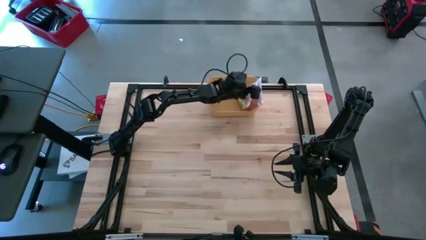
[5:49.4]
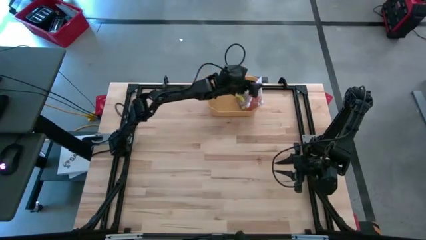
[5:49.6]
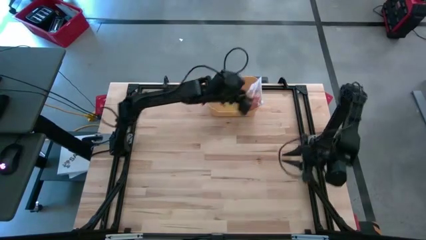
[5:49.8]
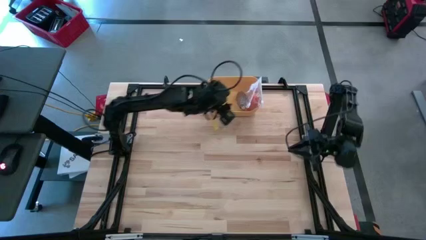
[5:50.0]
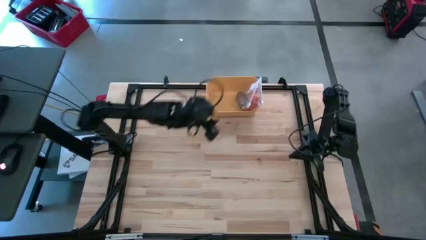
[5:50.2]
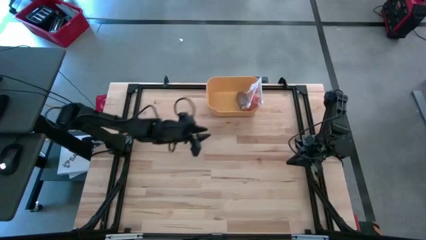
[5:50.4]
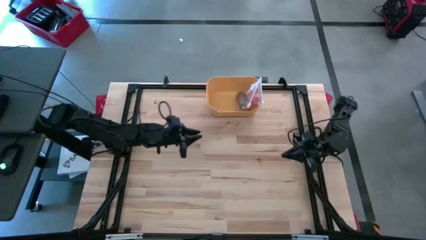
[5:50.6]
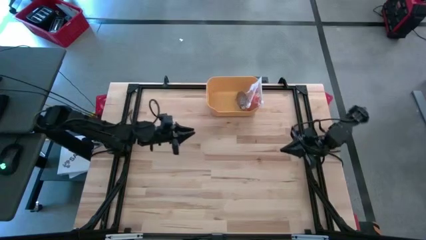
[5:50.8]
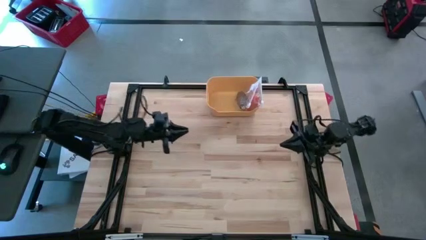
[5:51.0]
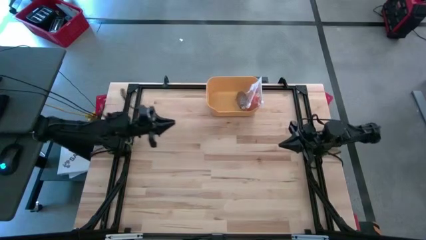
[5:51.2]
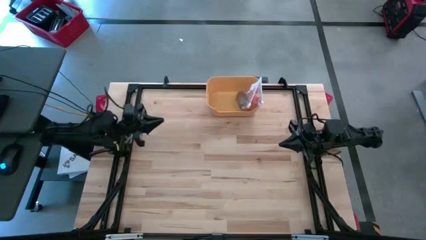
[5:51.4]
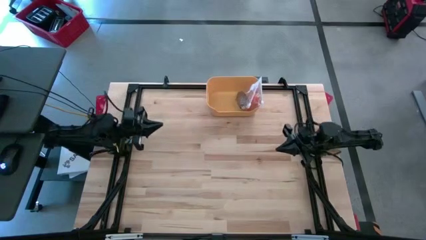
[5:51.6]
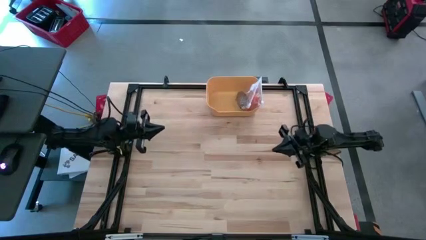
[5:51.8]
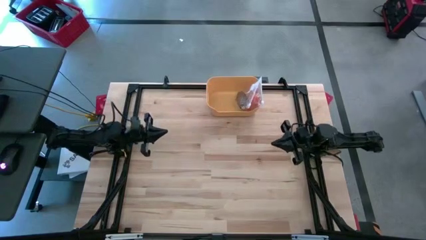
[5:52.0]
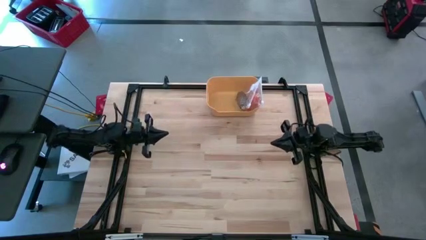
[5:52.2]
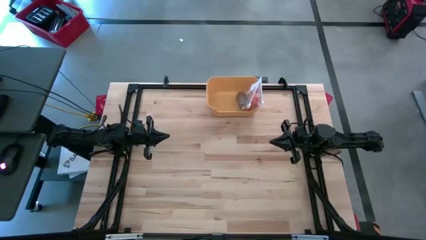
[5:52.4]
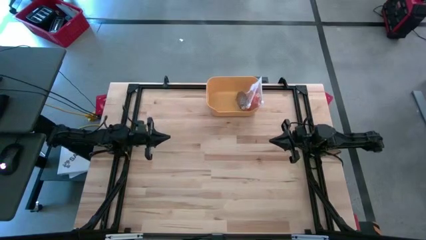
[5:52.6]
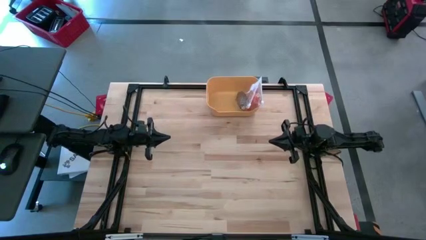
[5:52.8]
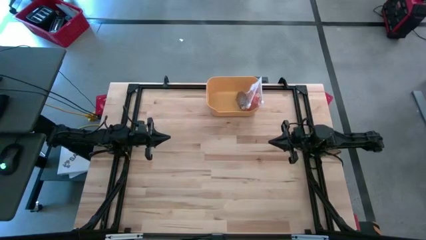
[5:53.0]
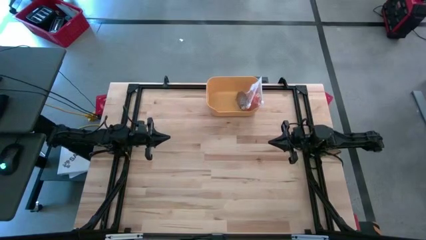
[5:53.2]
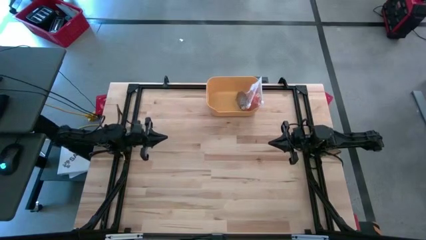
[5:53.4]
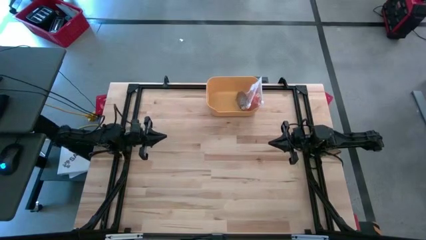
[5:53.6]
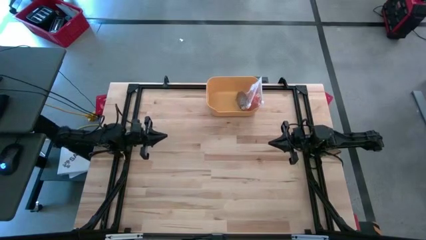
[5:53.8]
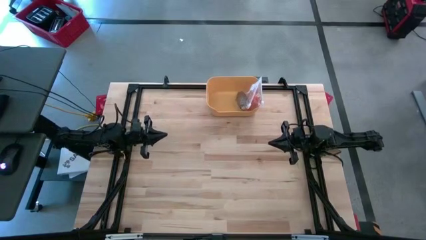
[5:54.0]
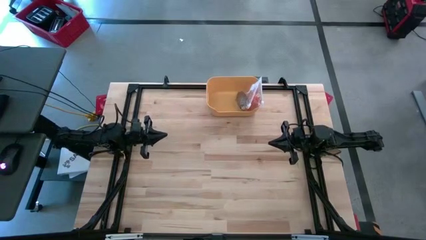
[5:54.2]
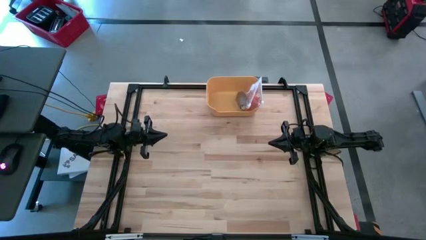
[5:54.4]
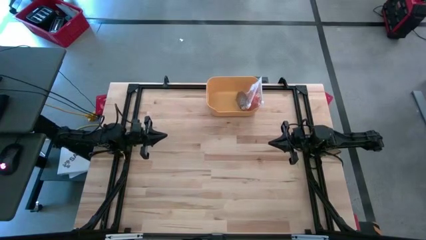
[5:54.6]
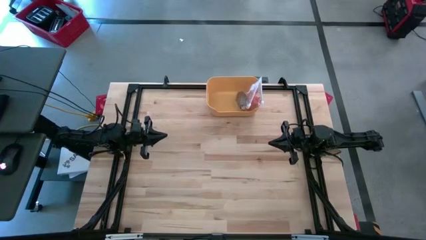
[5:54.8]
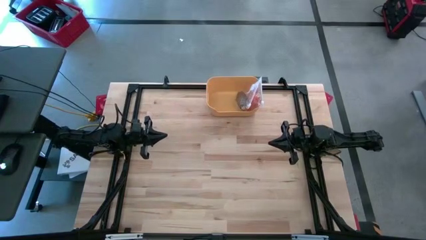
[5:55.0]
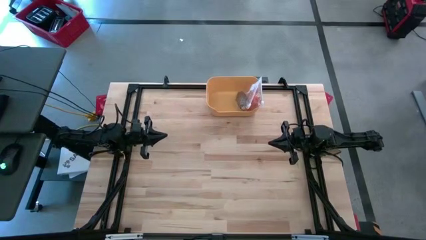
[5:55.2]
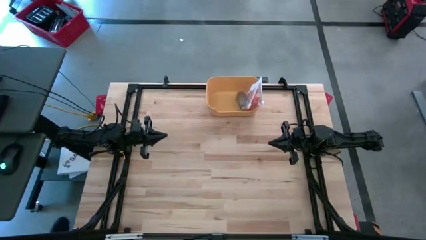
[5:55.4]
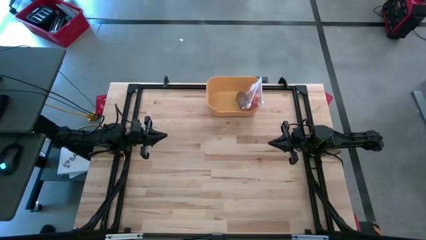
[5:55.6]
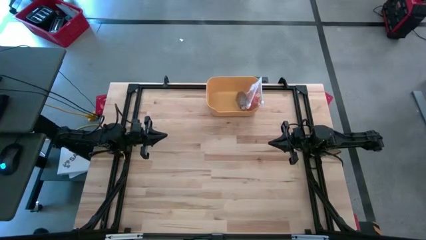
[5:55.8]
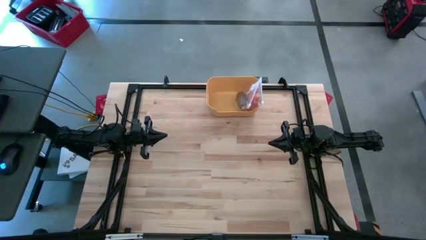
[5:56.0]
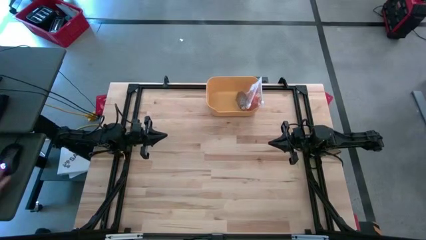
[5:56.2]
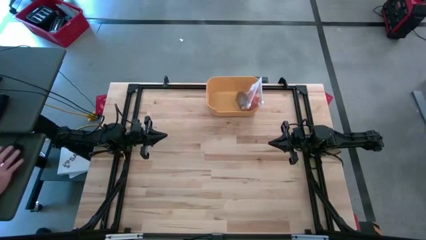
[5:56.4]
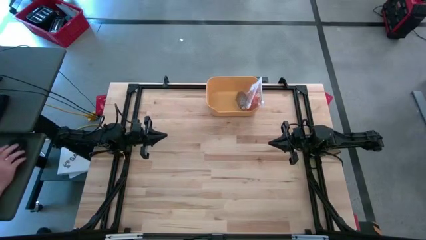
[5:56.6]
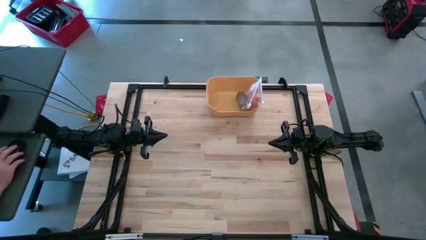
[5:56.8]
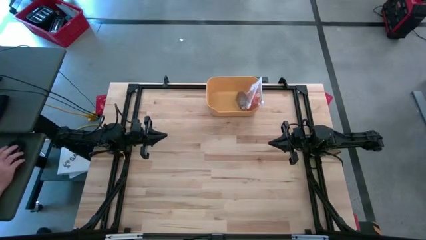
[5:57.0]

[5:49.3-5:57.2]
Task: Roll bandage
Return to Home Position

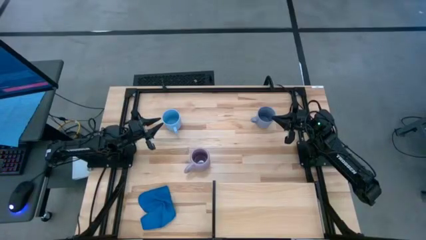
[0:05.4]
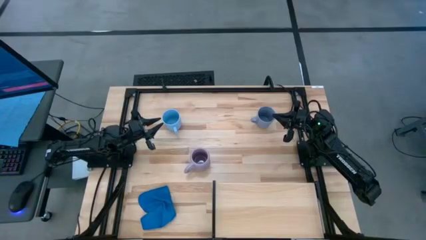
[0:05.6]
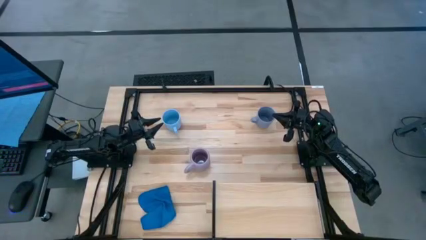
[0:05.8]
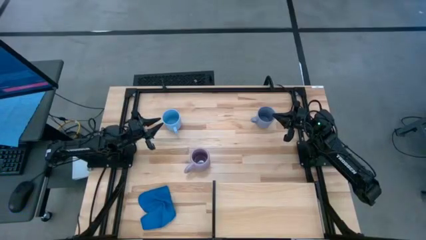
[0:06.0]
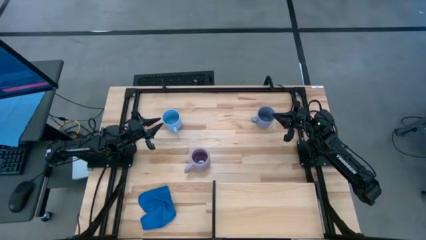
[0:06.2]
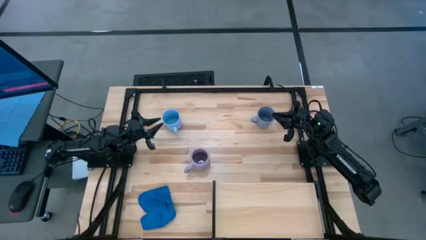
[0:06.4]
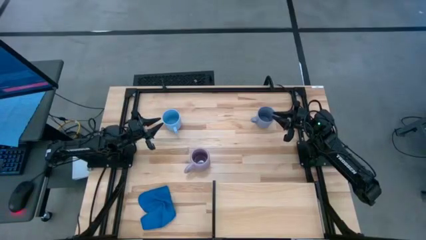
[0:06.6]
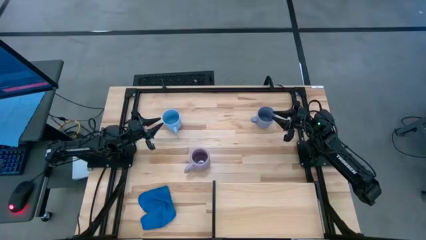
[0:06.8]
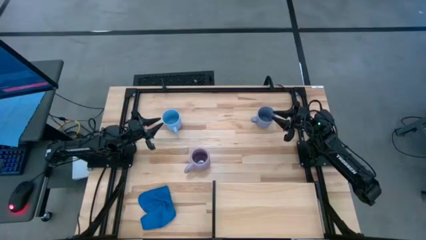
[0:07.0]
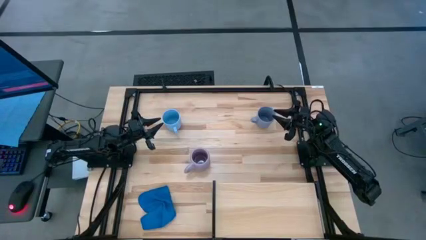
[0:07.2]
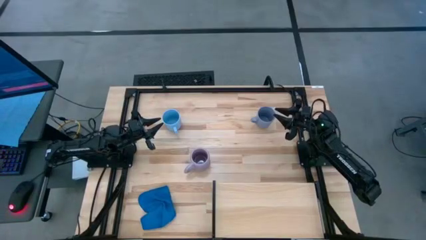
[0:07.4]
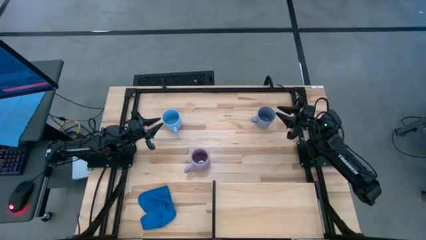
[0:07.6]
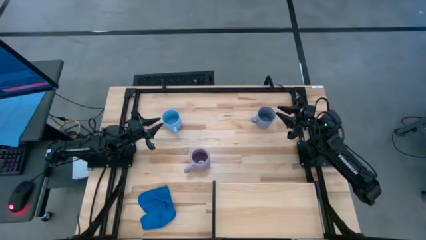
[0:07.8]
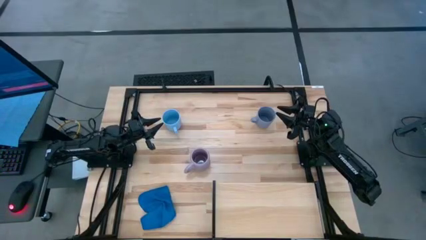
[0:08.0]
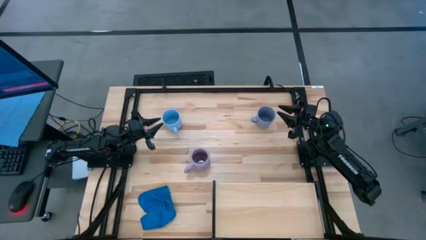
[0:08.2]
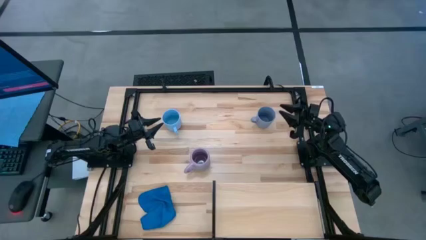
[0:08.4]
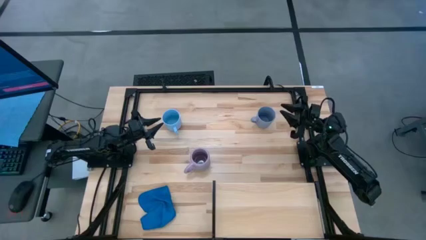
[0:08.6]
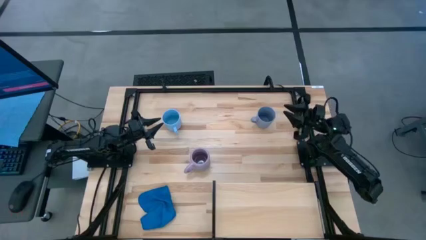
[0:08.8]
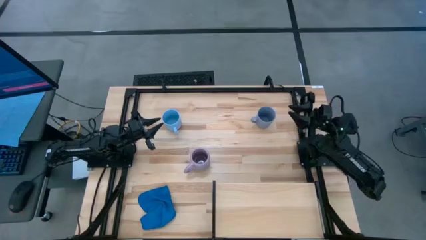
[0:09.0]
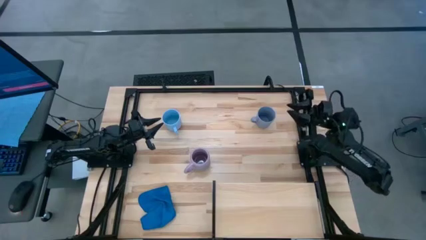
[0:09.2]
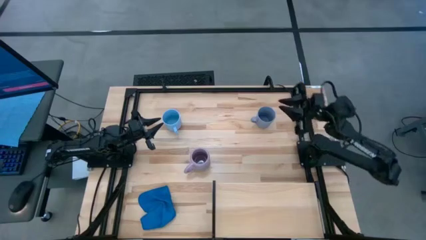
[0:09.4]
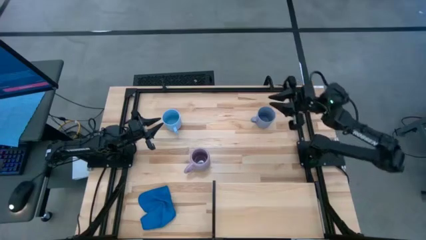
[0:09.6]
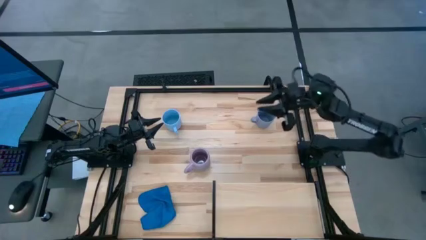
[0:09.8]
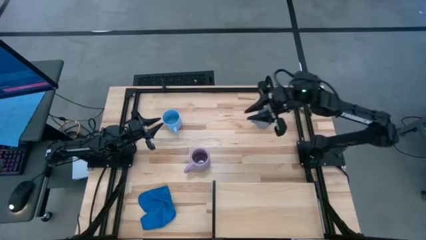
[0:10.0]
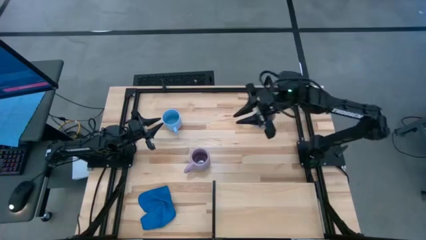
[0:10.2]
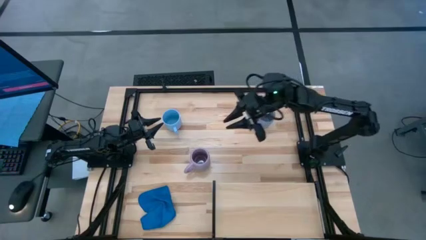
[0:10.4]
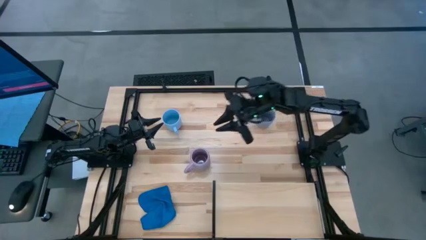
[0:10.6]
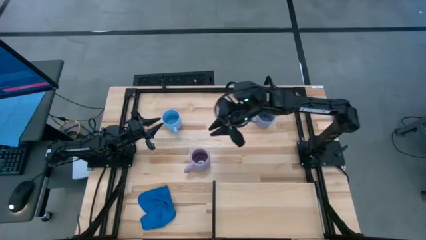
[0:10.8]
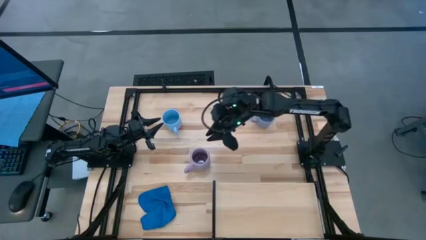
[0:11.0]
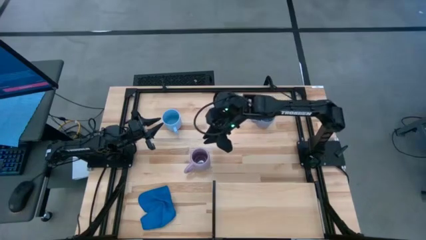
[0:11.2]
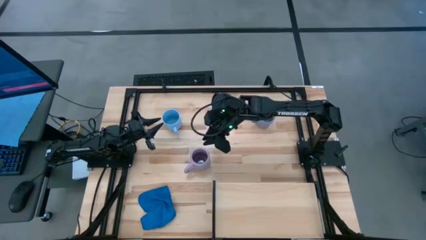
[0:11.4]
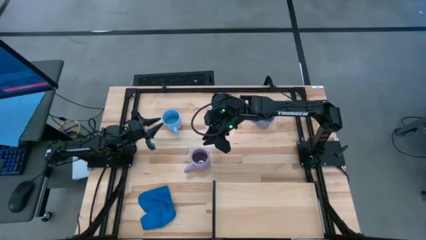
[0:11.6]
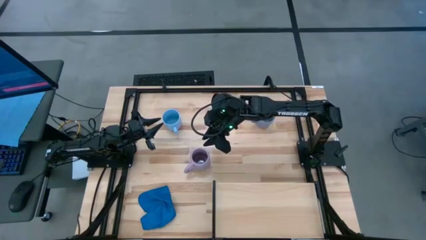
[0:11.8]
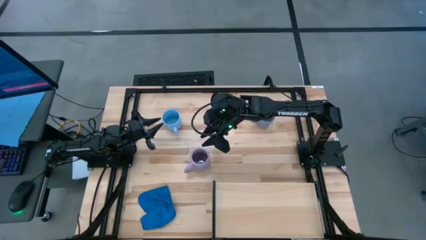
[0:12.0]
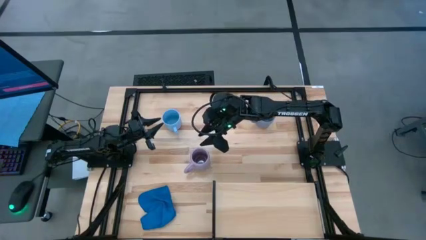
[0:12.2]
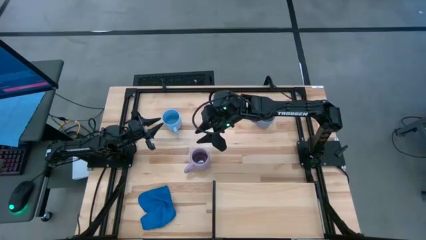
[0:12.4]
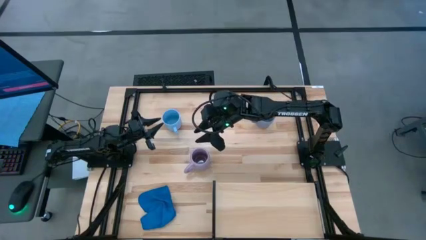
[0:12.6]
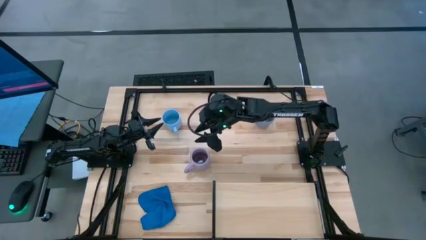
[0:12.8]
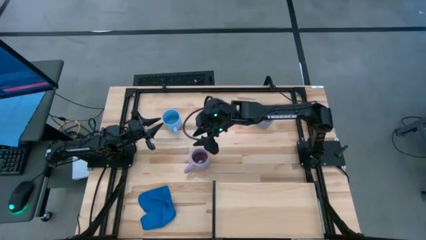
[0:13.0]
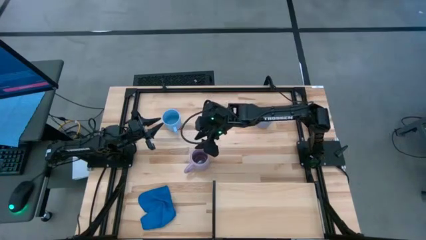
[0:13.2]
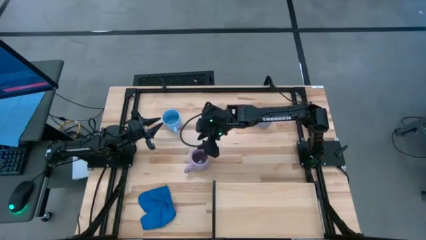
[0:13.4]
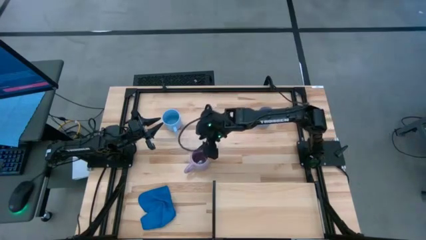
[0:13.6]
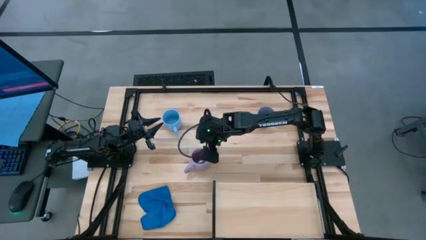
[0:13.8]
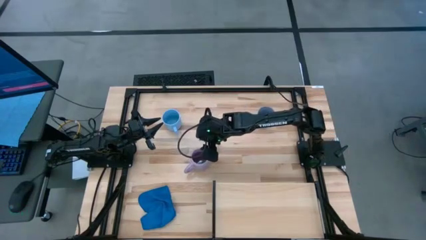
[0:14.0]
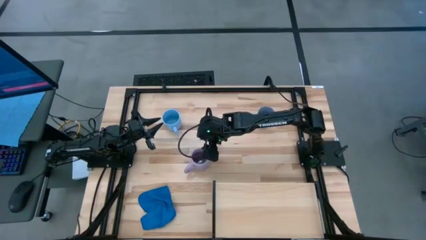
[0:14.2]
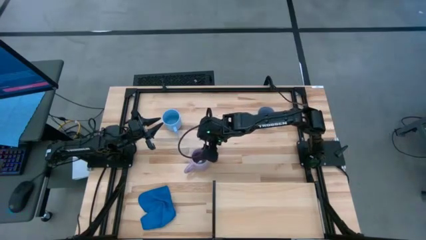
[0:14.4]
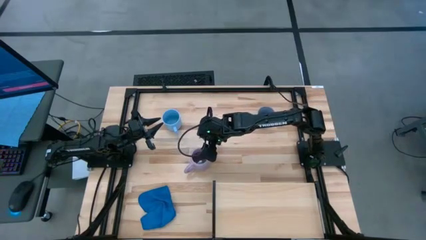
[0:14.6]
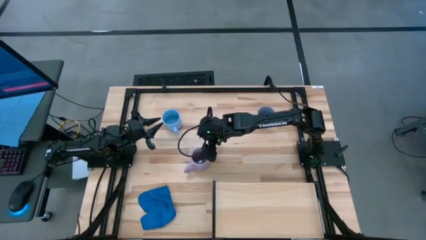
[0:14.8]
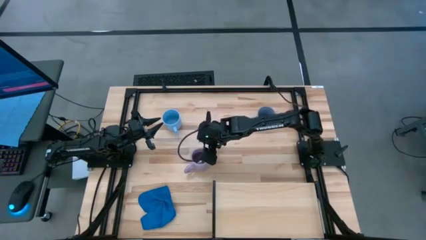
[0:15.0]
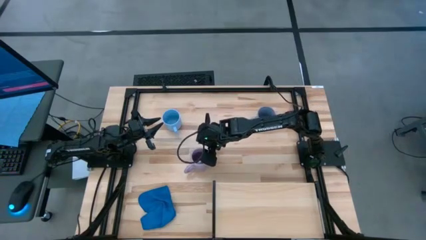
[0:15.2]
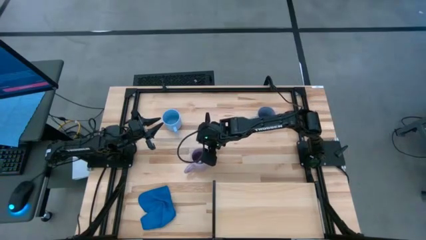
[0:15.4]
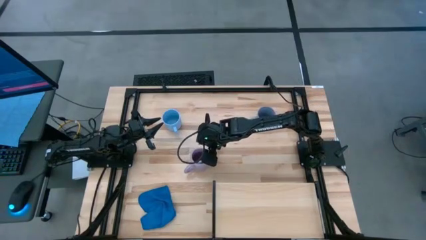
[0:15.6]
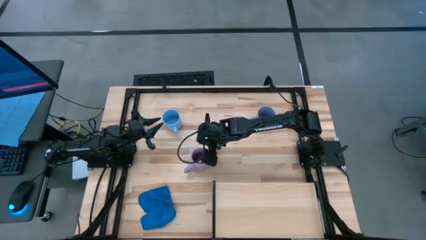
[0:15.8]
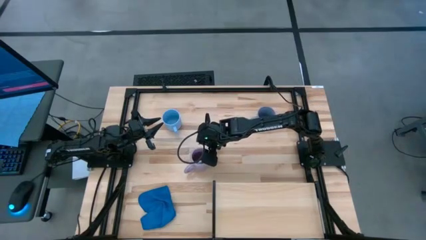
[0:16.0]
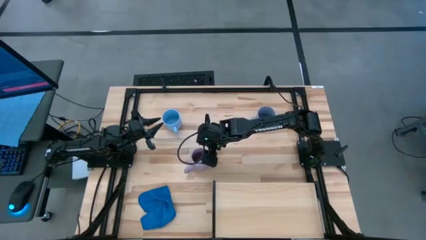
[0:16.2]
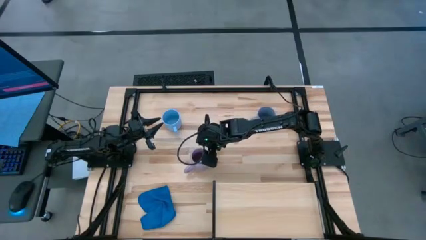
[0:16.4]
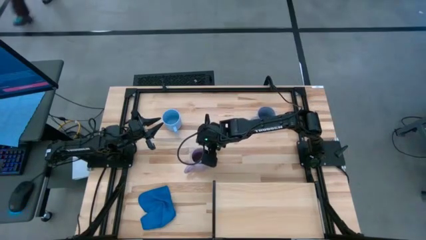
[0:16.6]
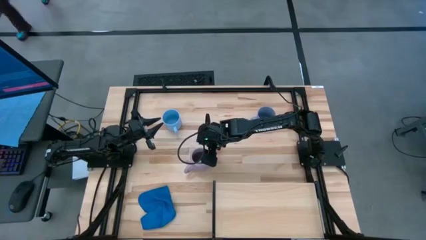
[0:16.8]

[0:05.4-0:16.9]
Task: Stack small to large cups/mugs on shelf
Put the purple mug on the shelf
